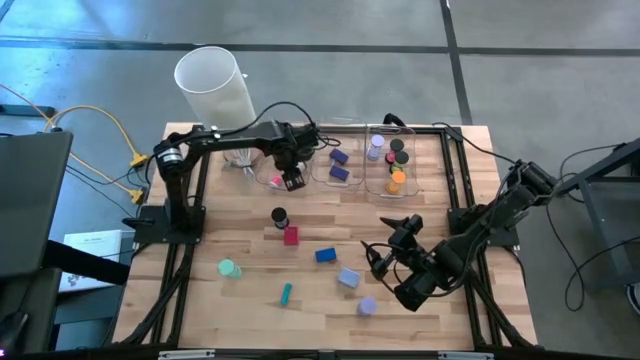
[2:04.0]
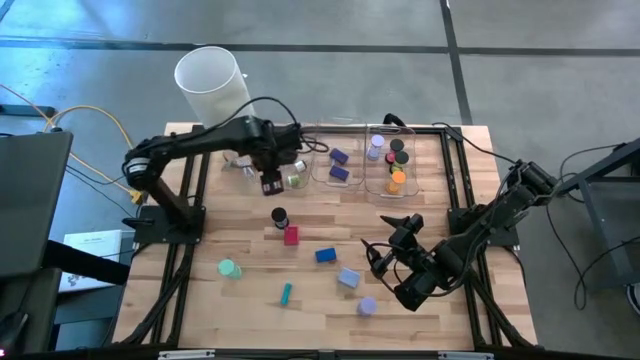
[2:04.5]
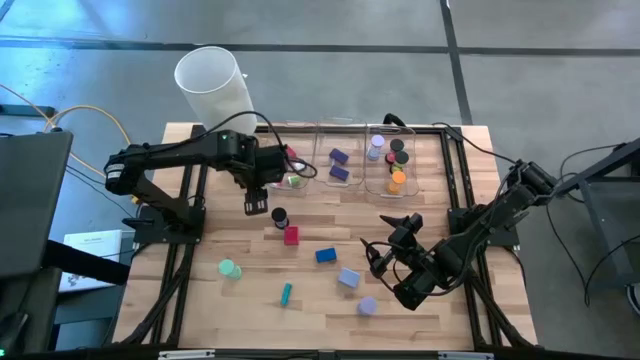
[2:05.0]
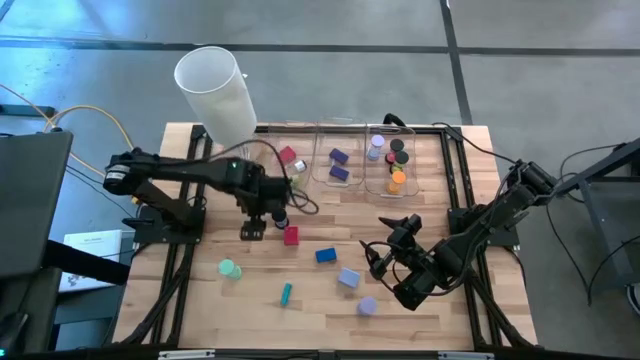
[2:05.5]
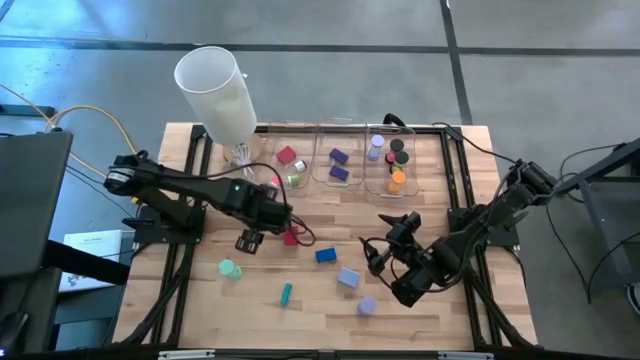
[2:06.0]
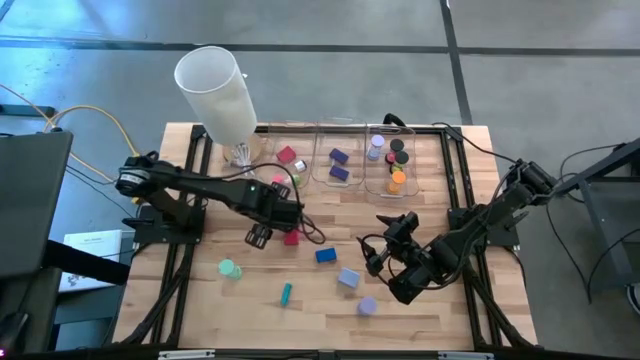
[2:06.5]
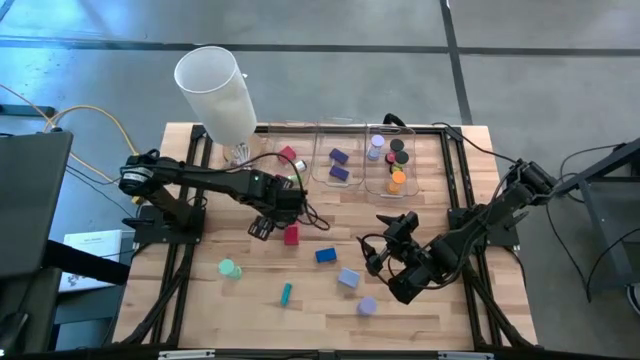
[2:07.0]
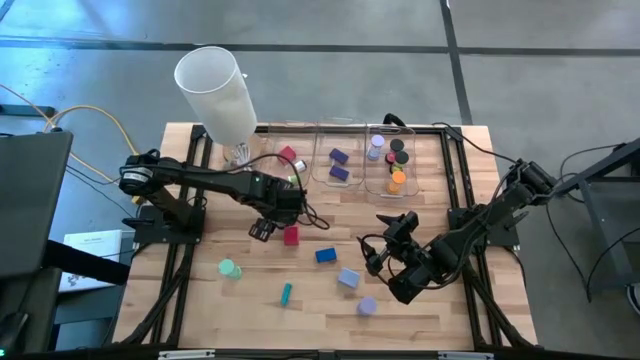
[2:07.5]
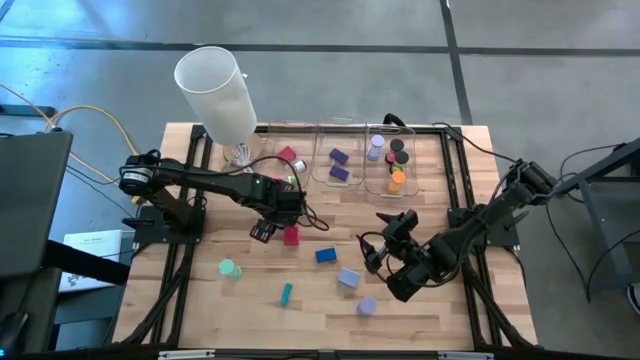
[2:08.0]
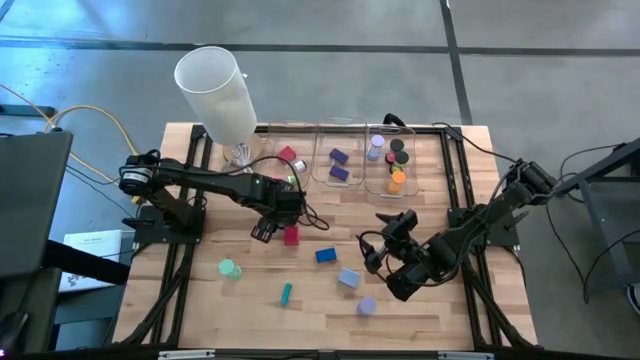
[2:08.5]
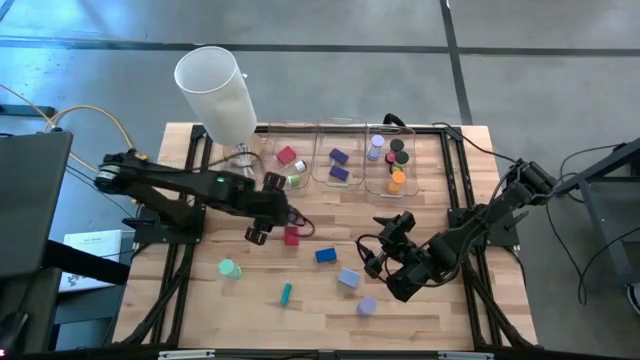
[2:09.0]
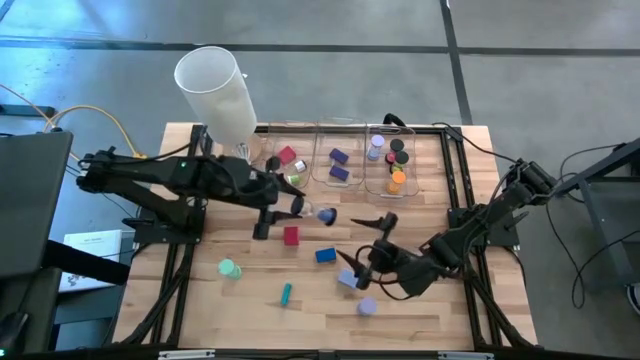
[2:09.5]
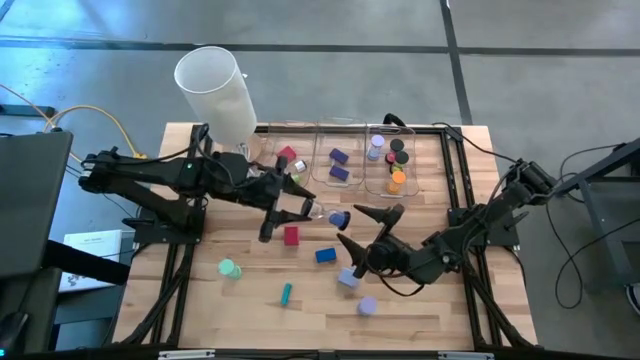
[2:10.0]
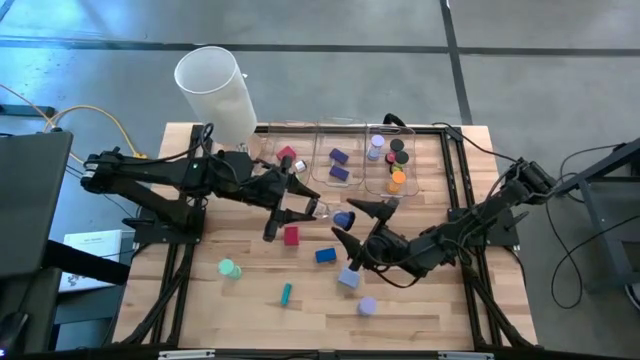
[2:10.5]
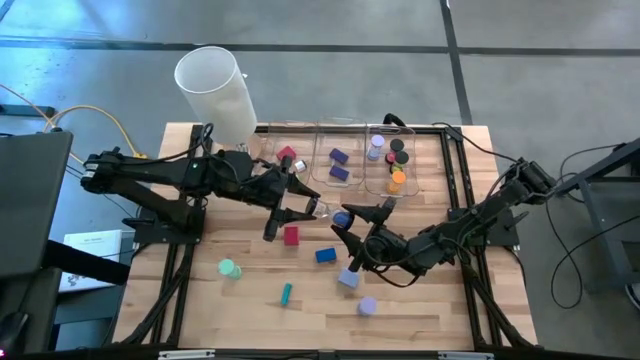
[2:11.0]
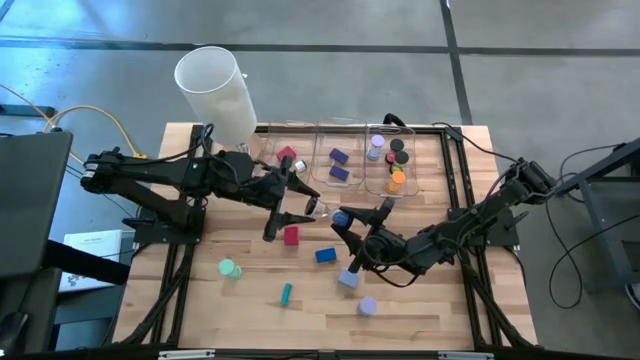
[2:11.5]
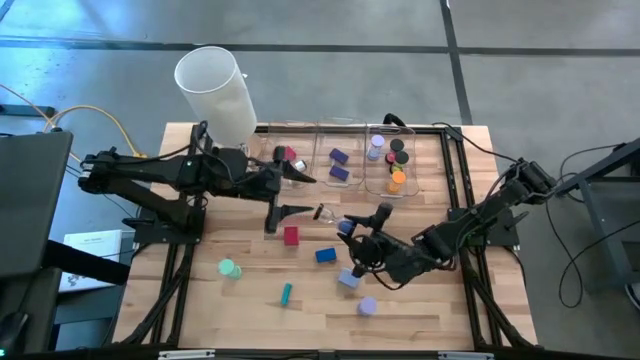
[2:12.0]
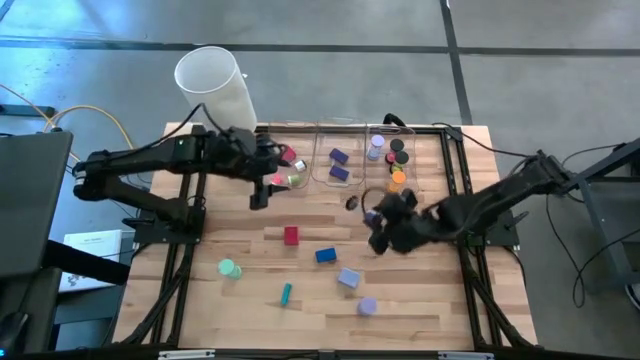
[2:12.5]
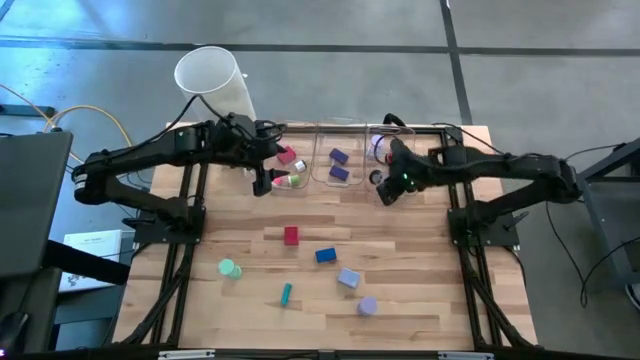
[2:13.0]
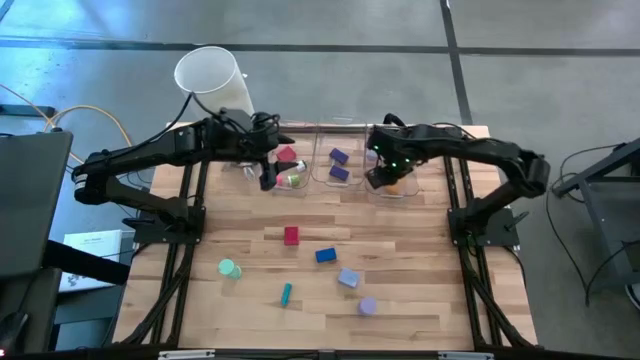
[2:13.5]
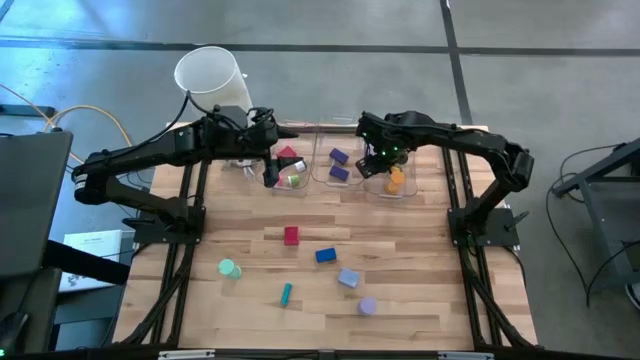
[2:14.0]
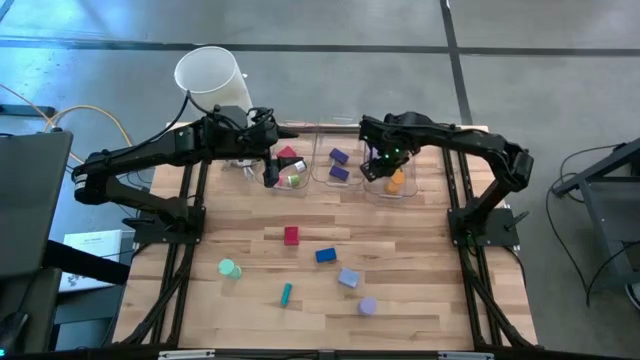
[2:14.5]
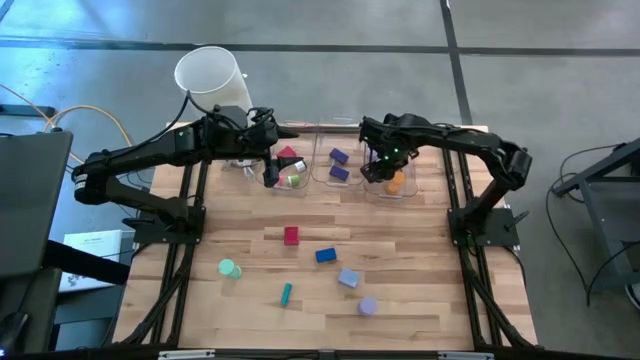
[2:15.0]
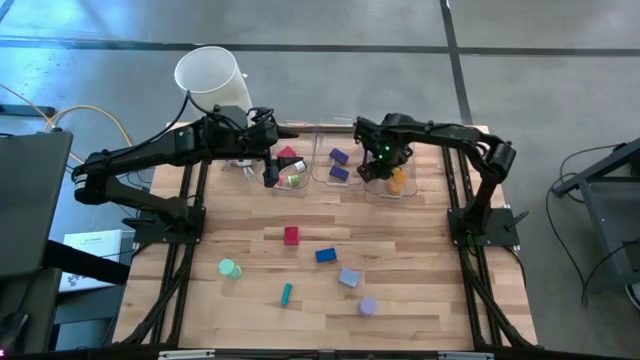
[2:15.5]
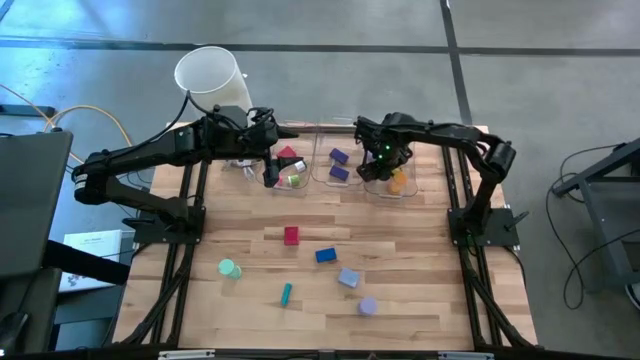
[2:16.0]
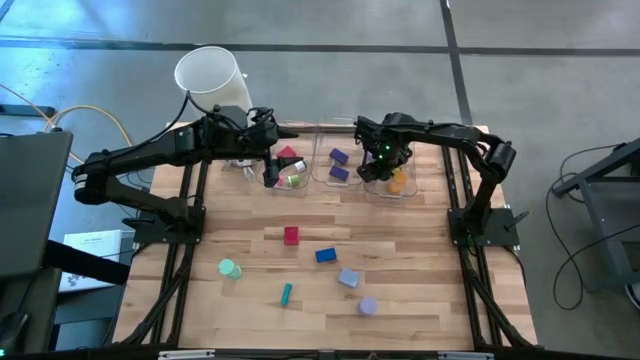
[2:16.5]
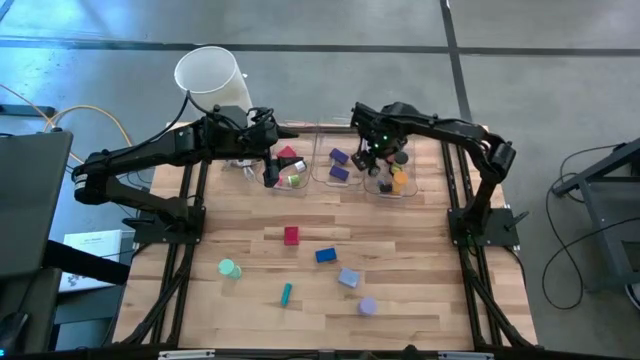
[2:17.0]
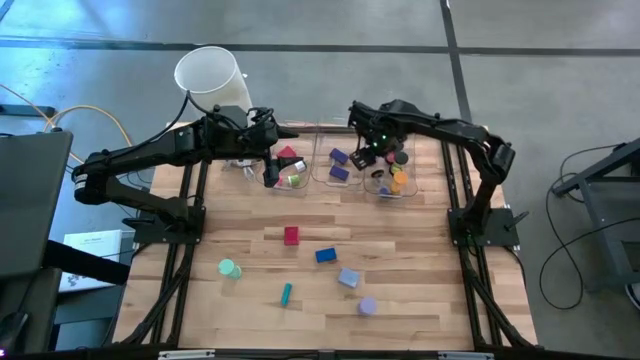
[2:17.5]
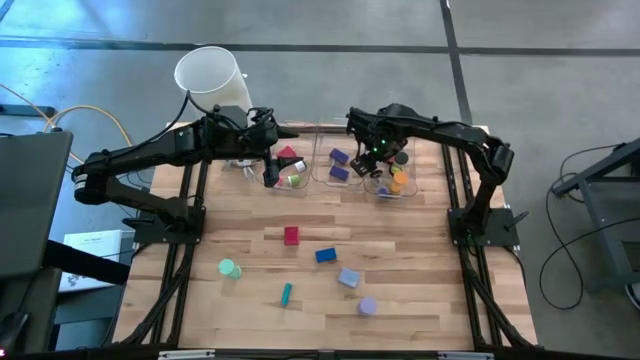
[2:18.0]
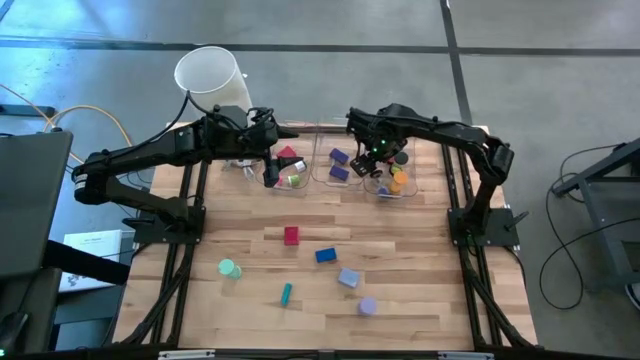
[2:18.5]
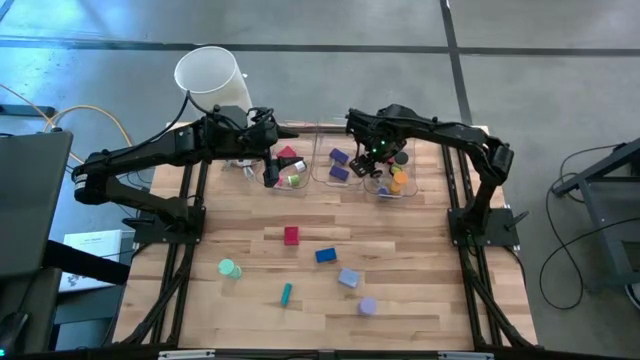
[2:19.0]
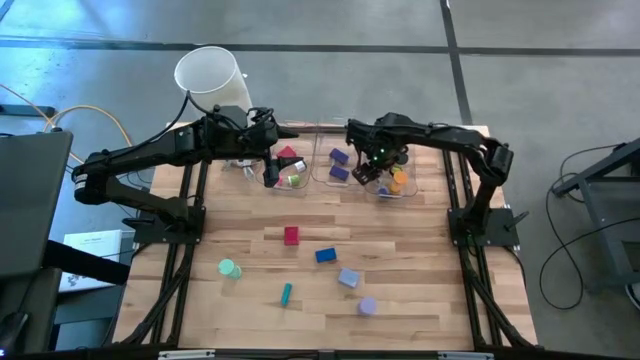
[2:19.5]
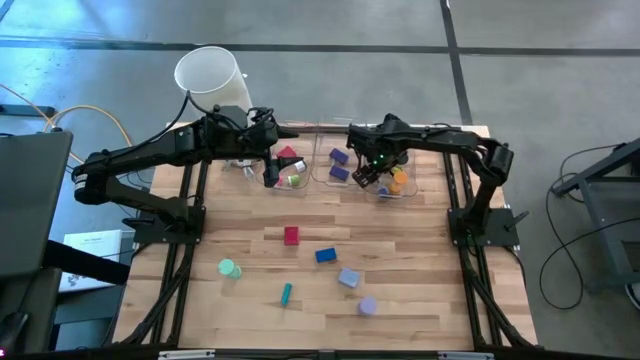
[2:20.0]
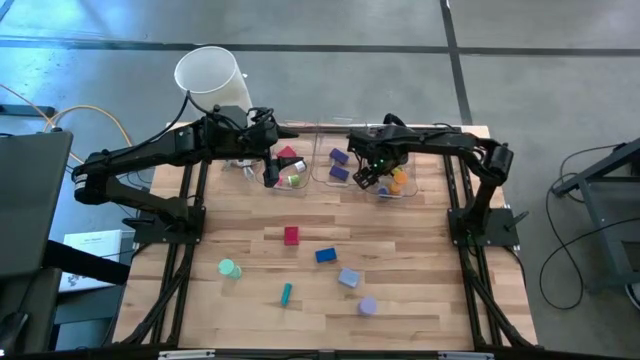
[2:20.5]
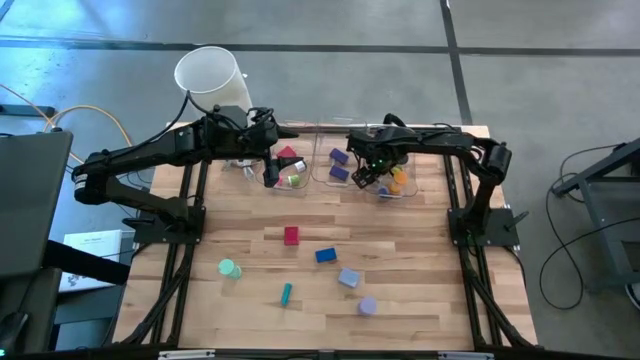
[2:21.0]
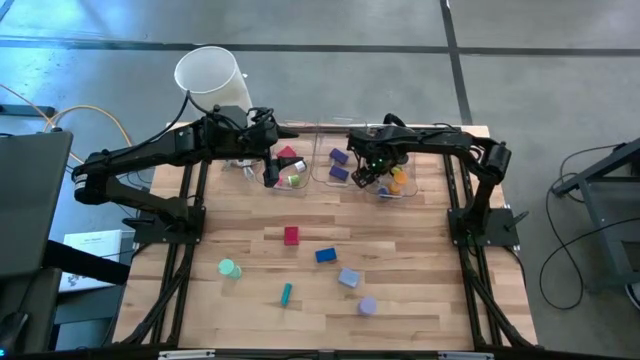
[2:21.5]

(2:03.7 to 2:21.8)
Task: Pick & Place Office items
Put the blue hourglass into the right transparent bin

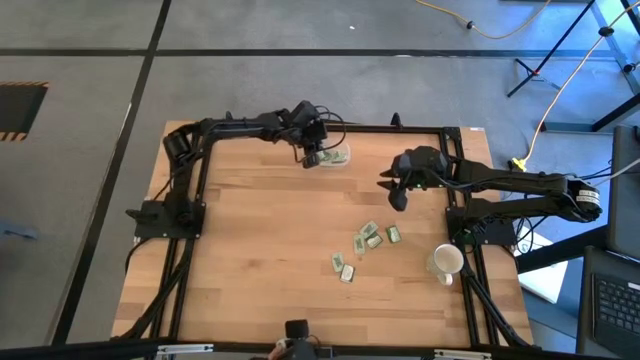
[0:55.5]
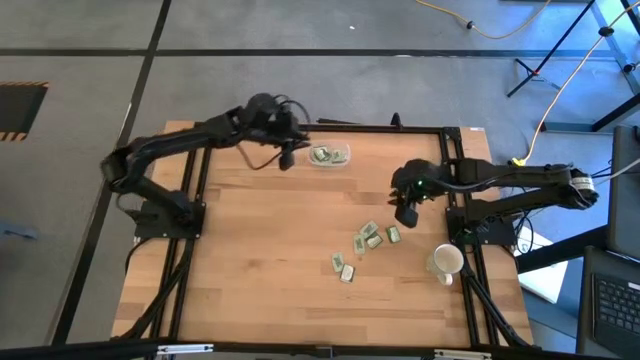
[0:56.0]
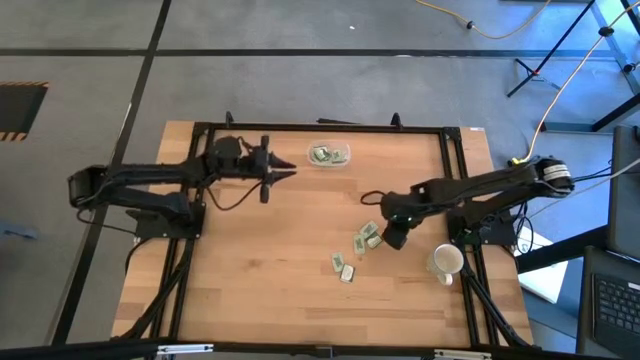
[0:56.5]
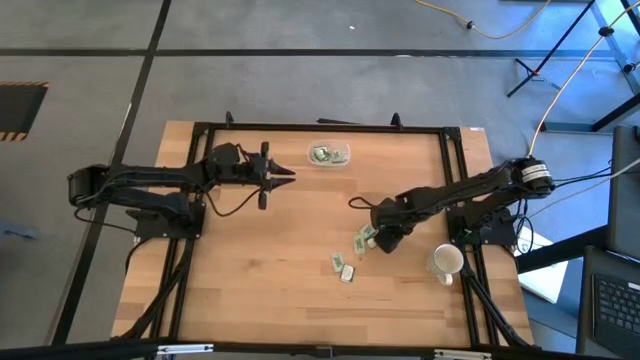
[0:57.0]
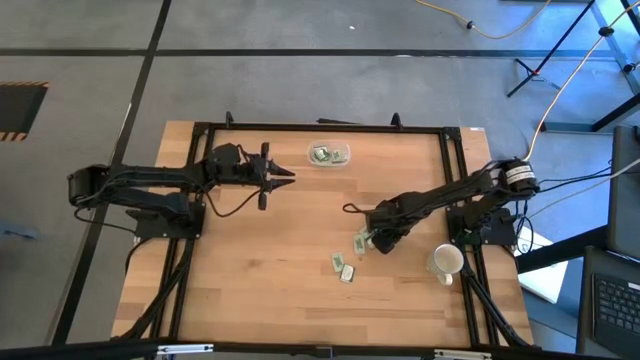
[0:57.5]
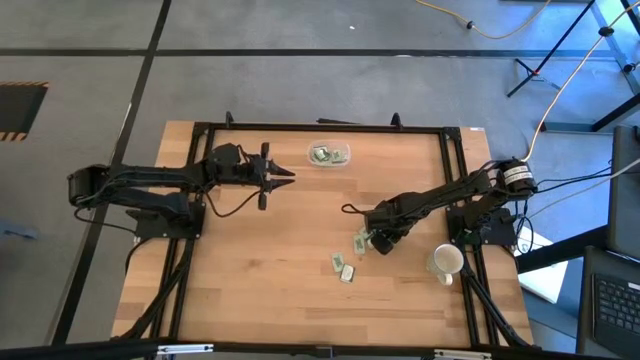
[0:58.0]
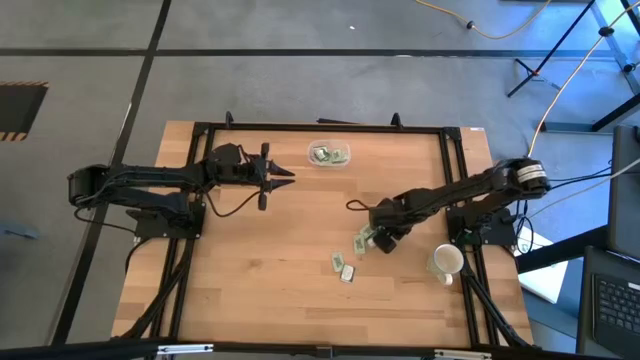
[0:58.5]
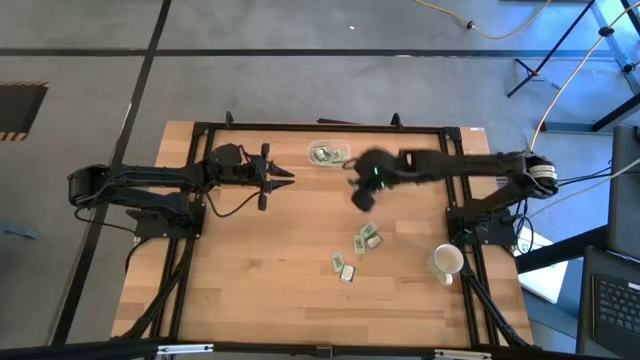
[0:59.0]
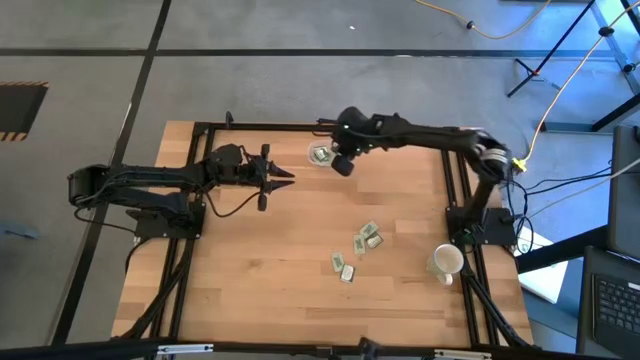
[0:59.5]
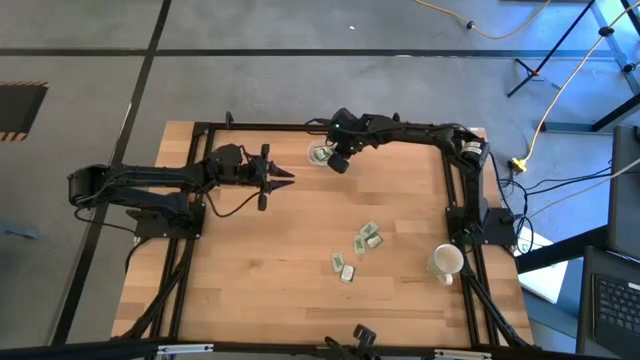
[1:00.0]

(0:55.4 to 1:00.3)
Task: Pick and place items into bin
Put the green stevia packet into the transparent bin
